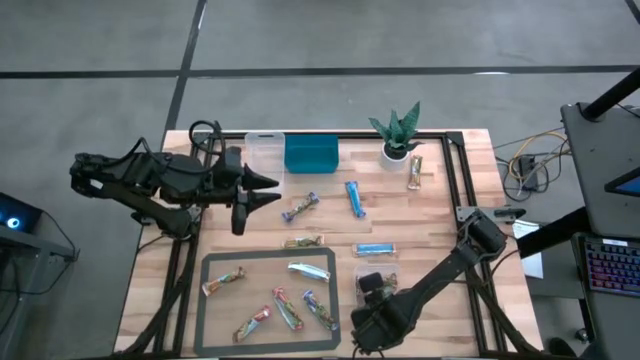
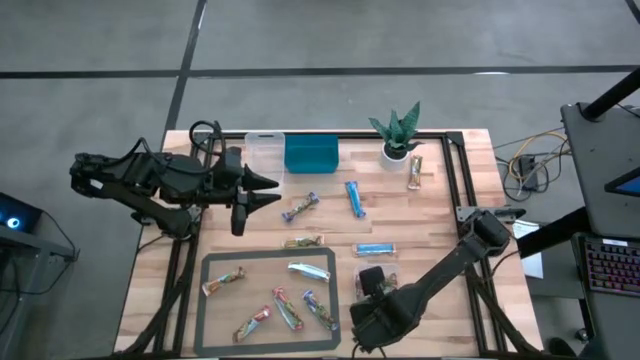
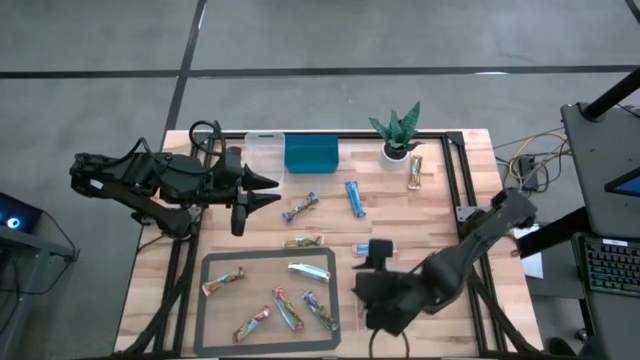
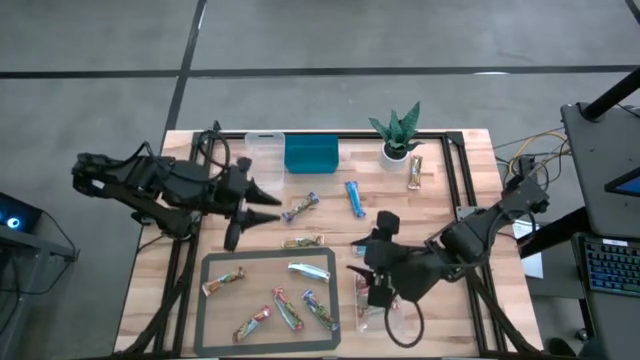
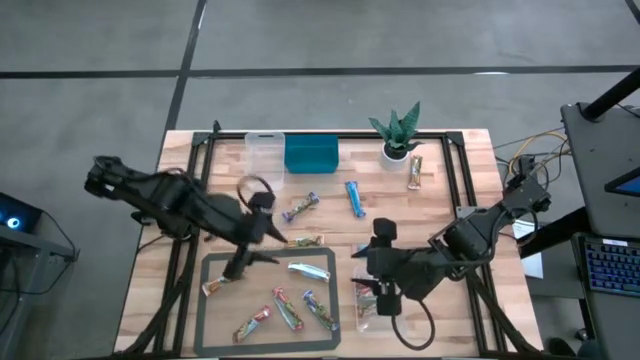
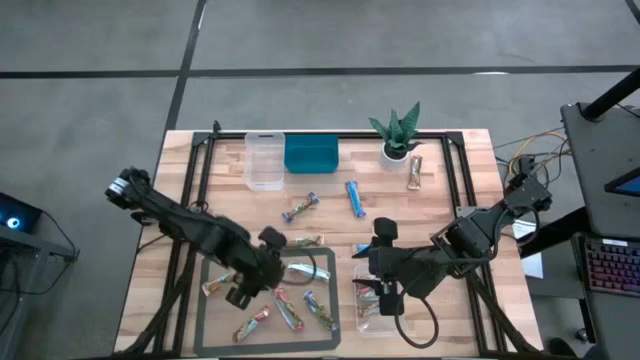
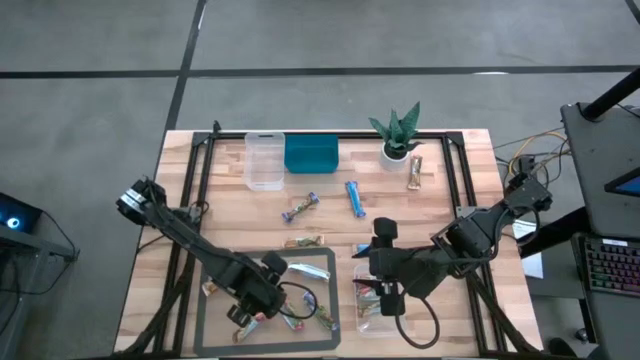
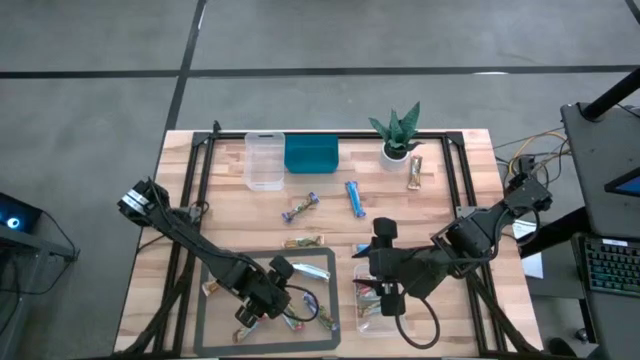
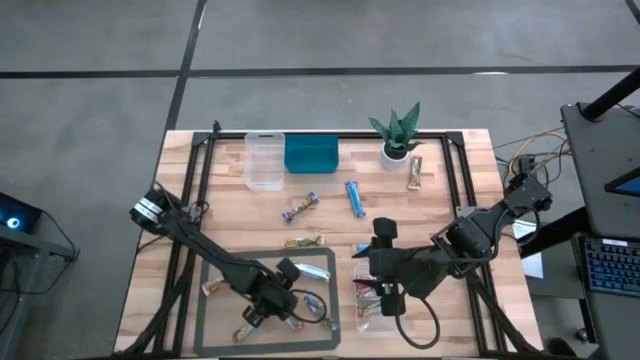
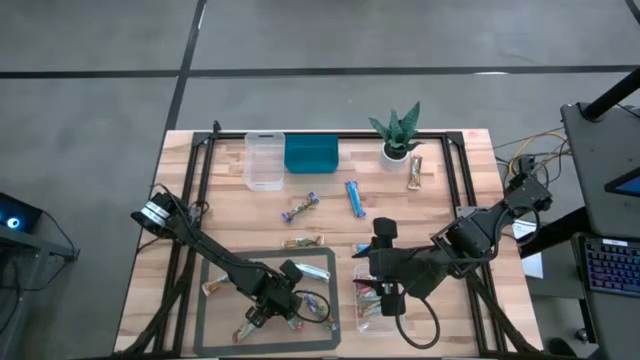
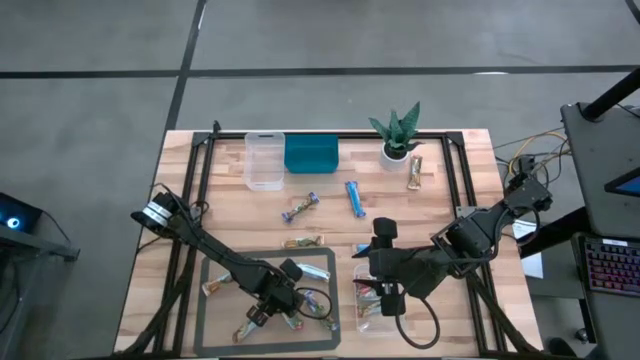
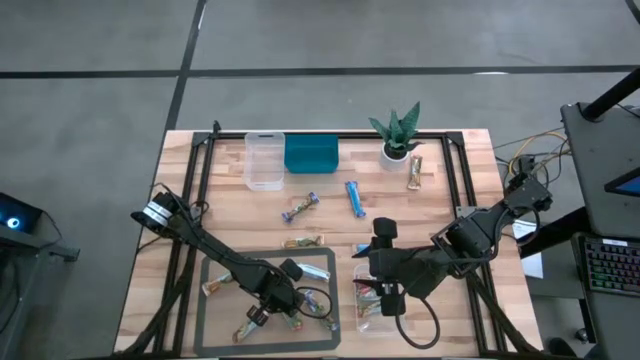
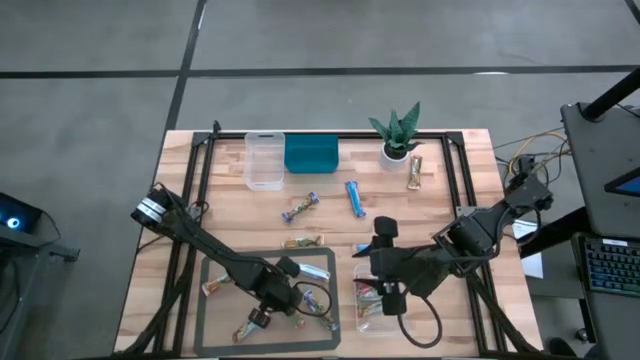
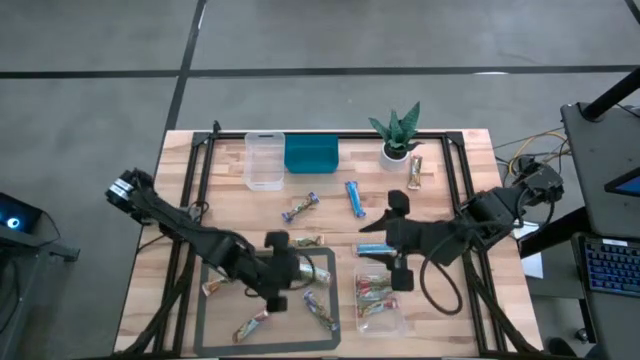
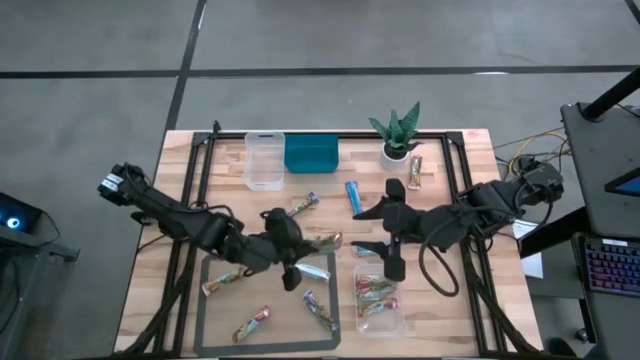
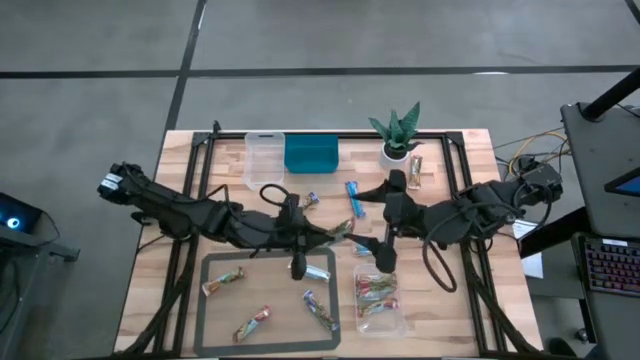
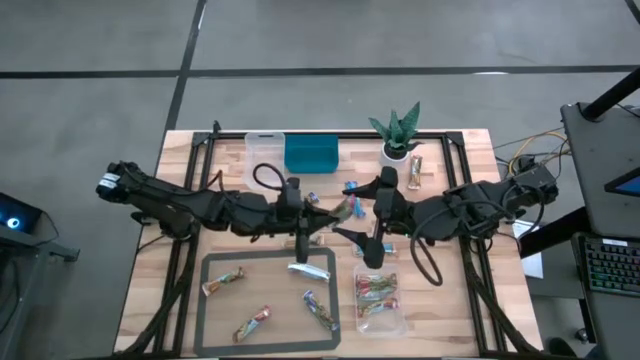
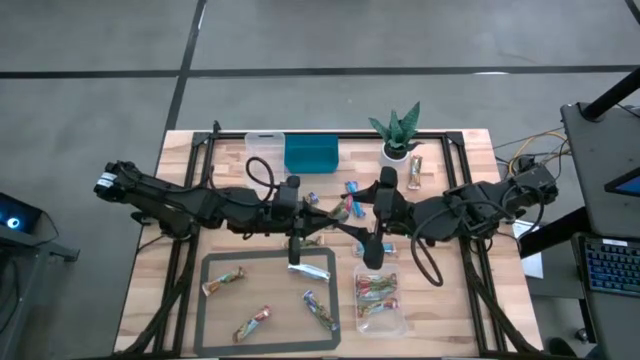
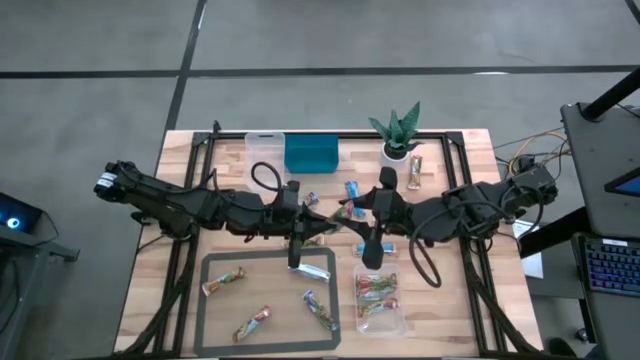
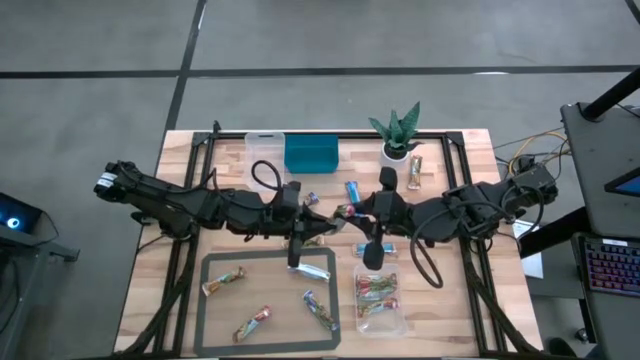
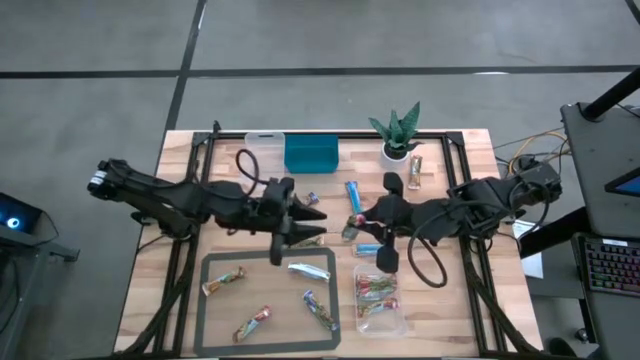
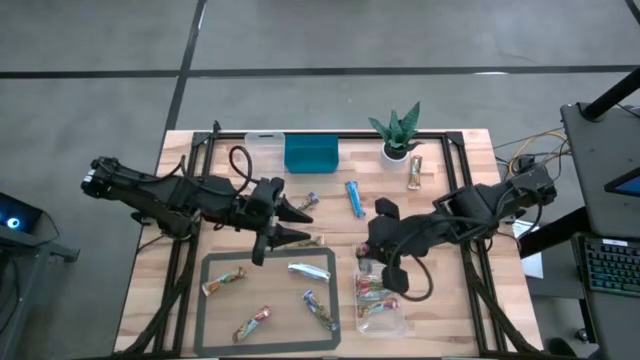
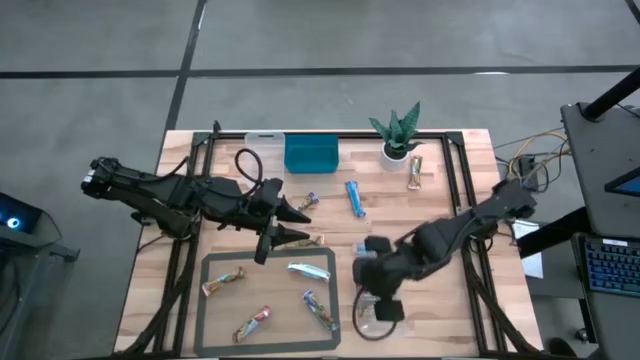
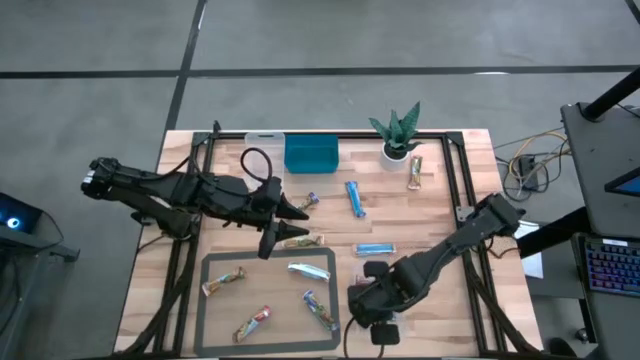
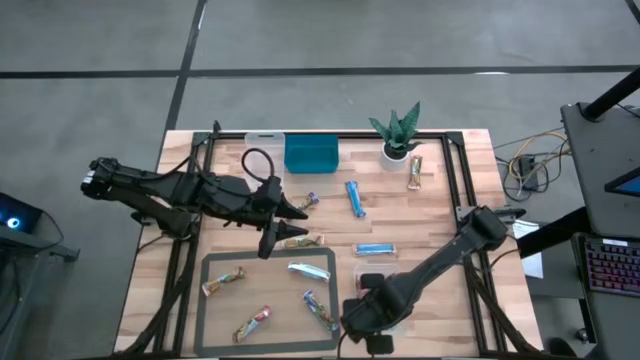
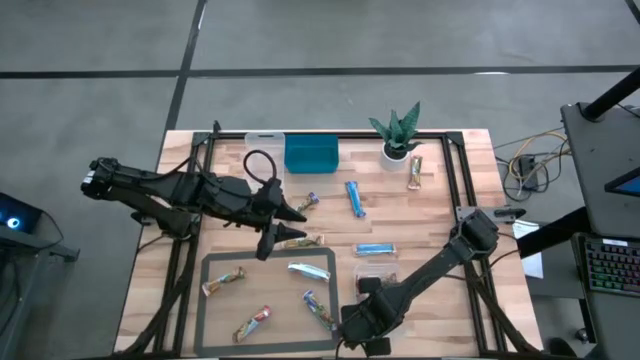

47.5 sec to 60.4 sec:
Task: Pick and place Granola Bars by type
Put the red granola bar into the bottom transparent bin

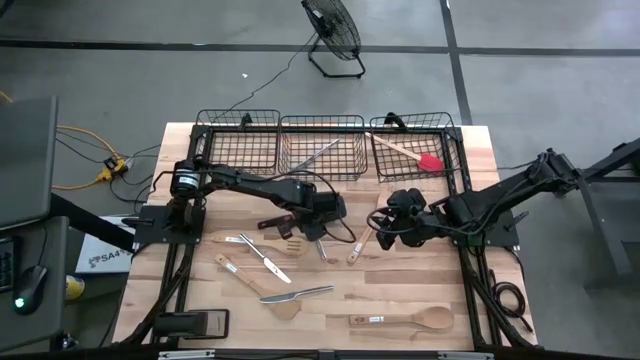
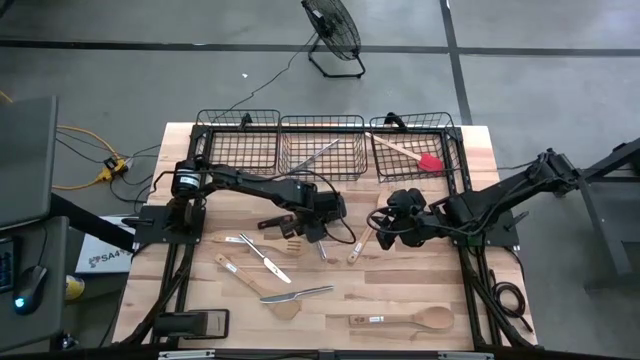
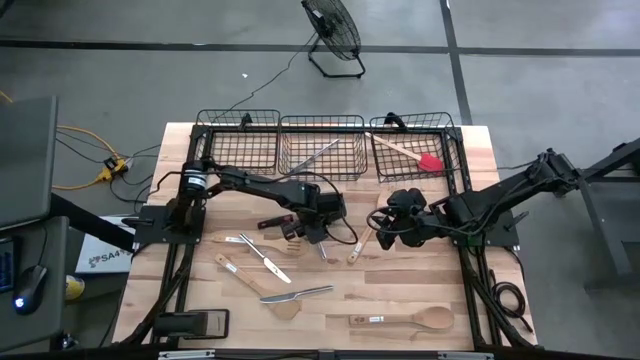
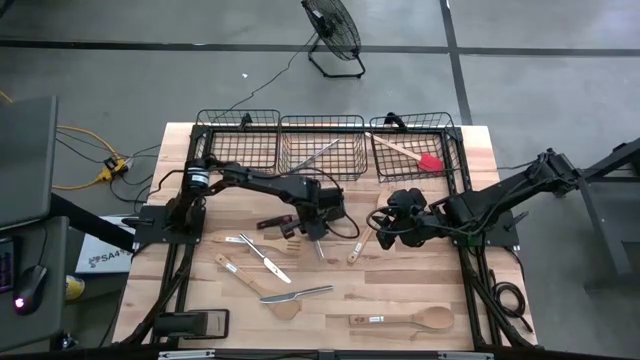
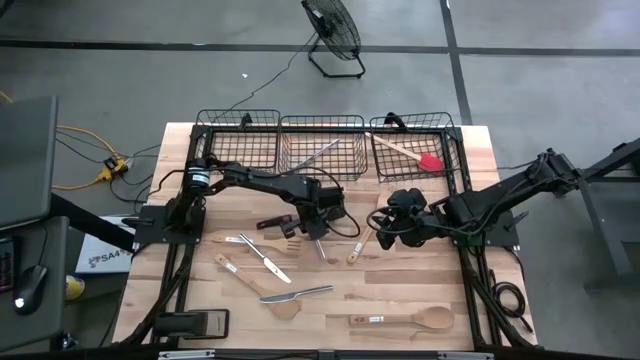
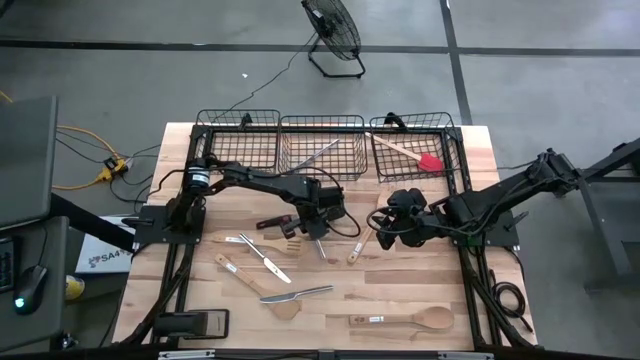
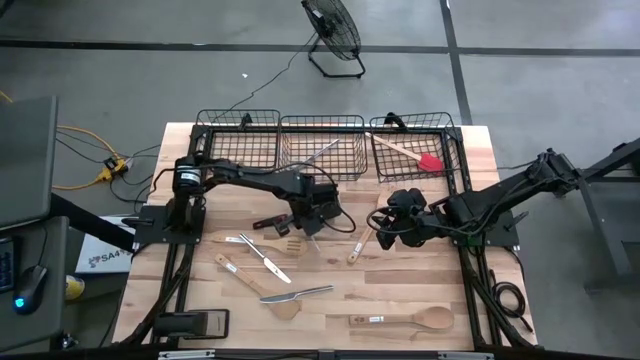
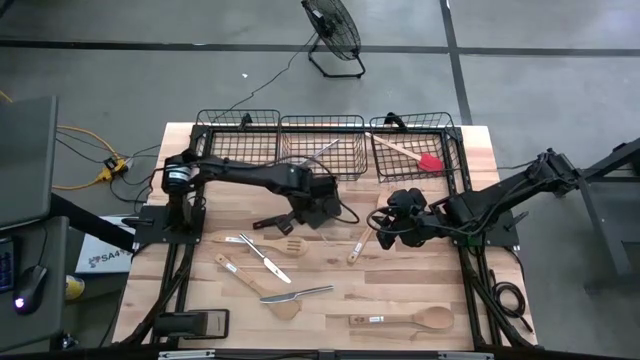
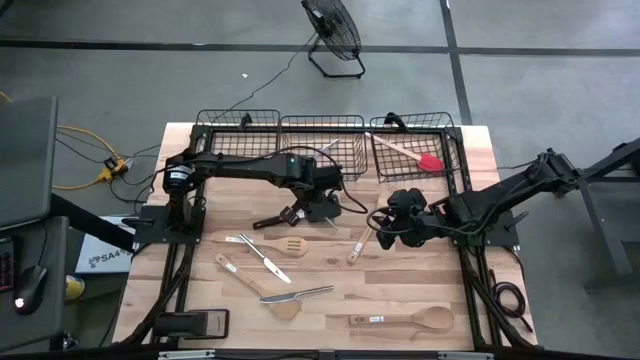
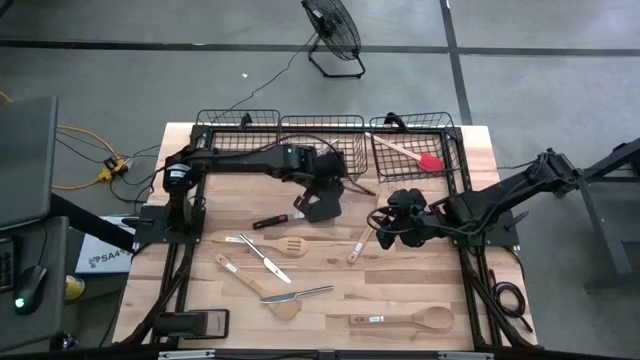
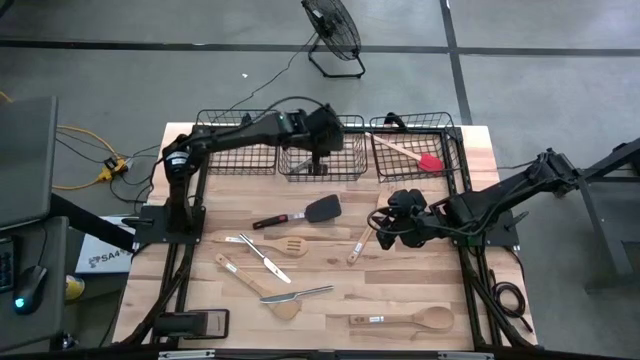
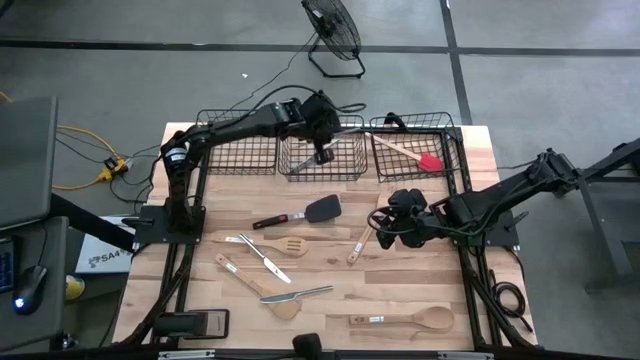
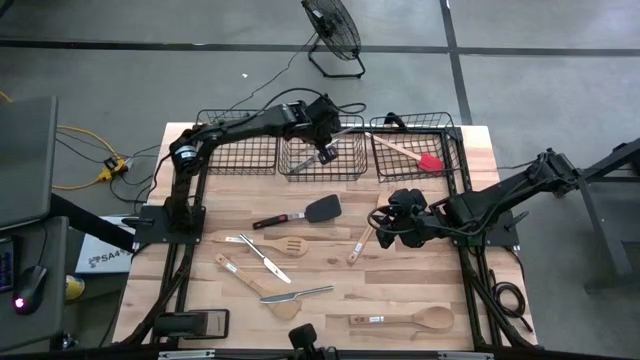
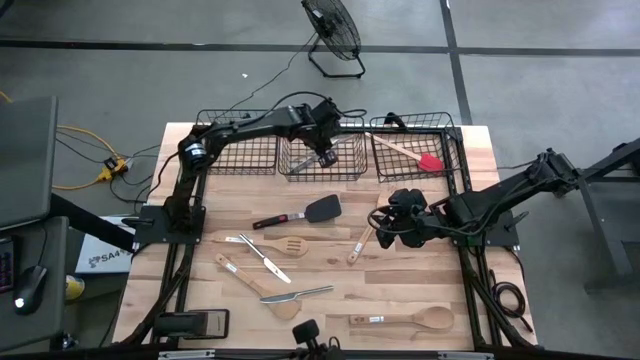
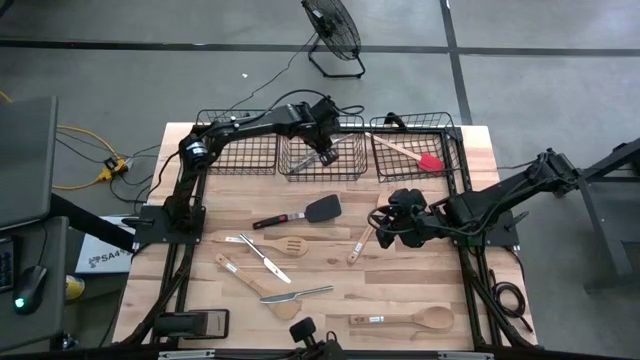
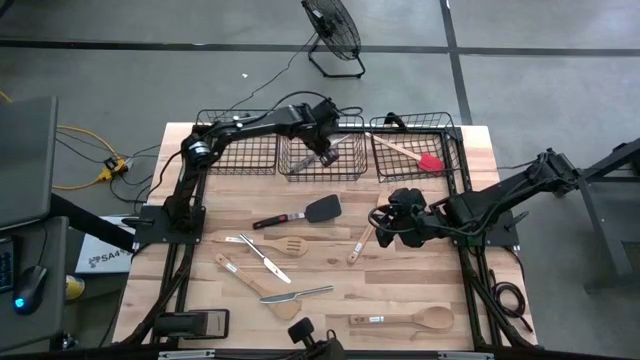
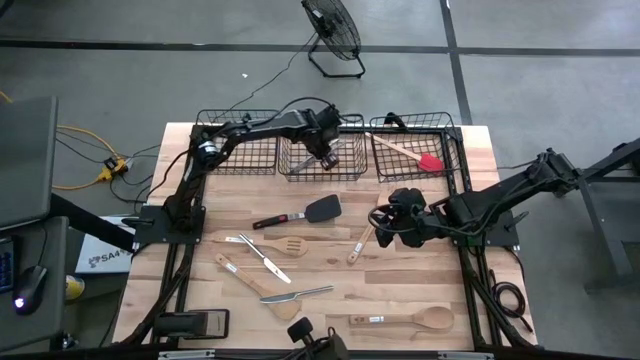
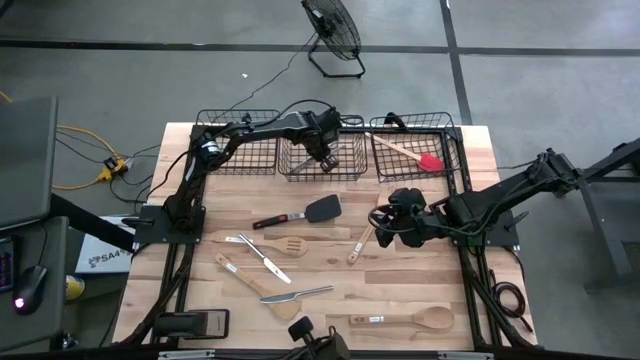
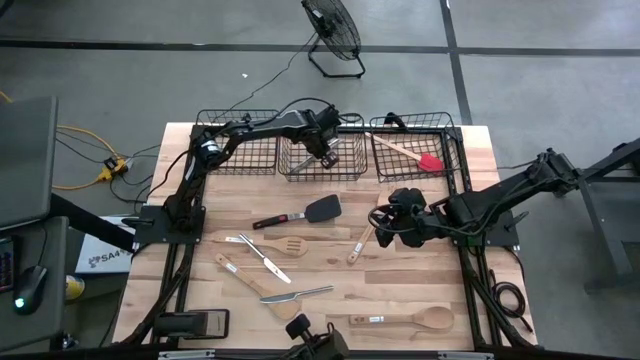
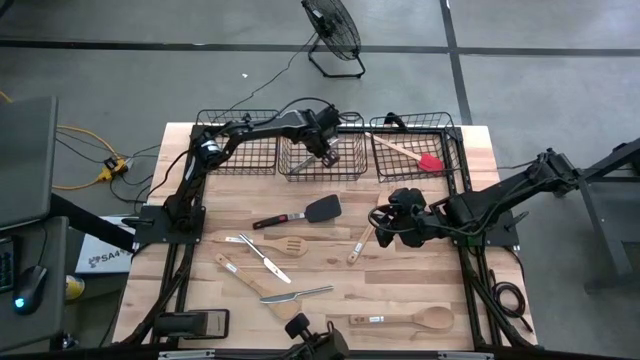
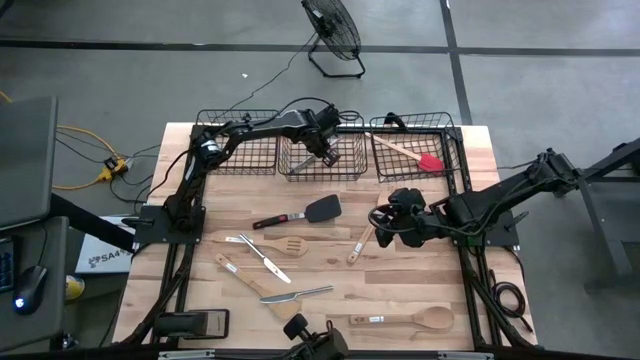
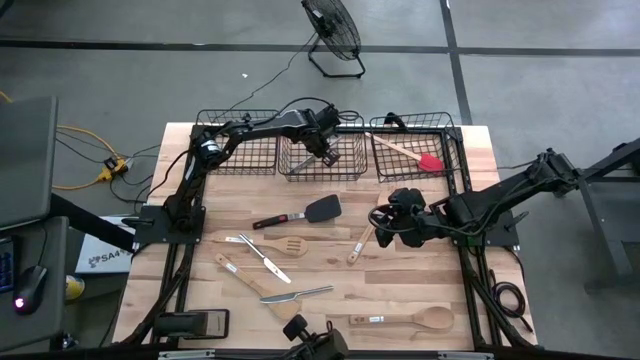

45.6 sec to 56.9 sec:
Task: Pick & Place Kitchen Items
Put the silver table knife into the middle mesh basket
